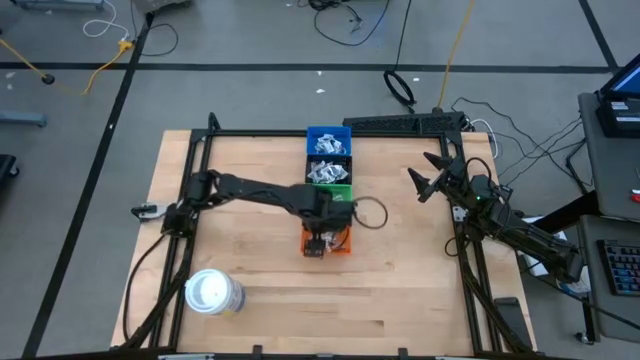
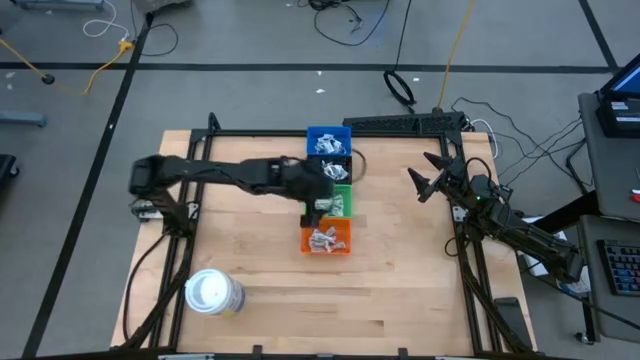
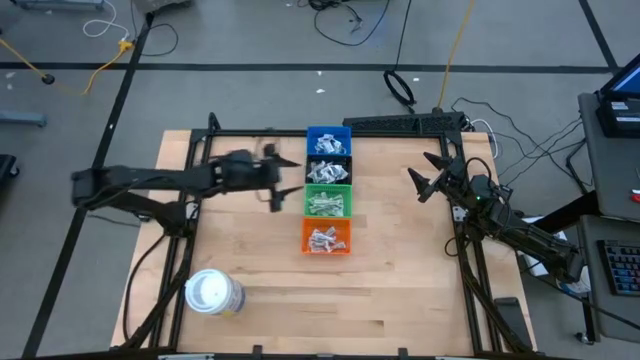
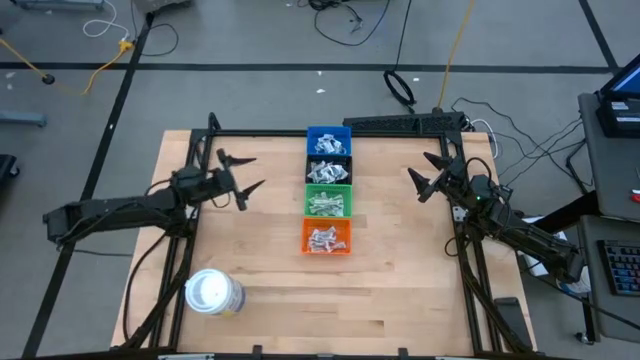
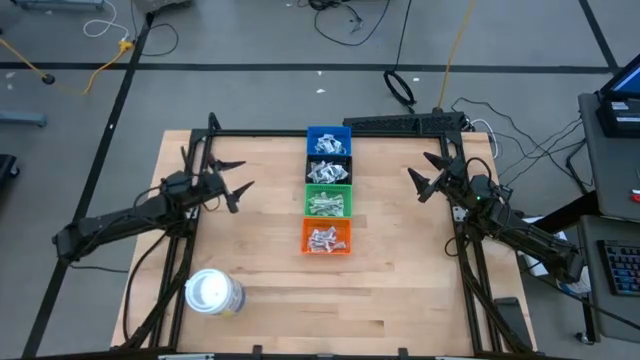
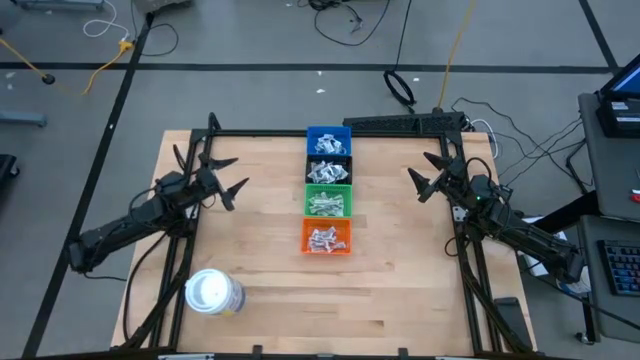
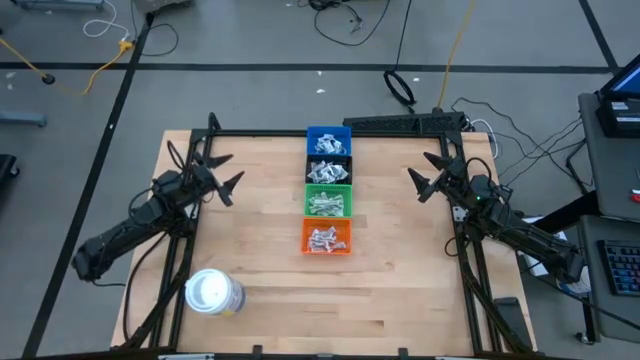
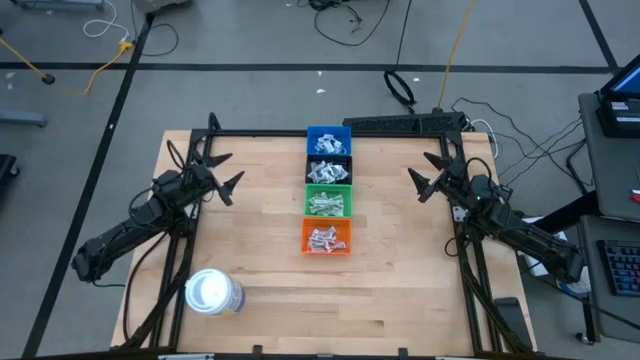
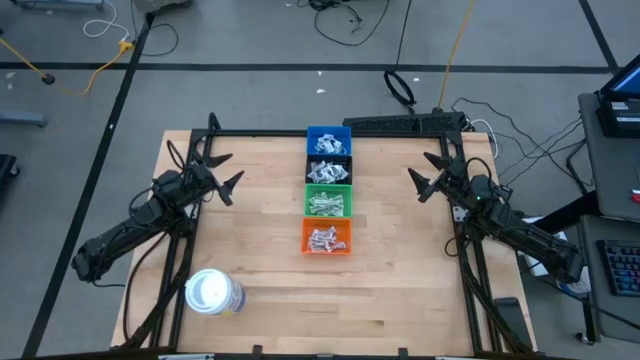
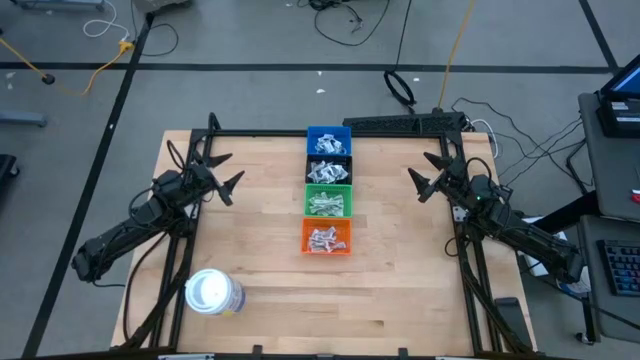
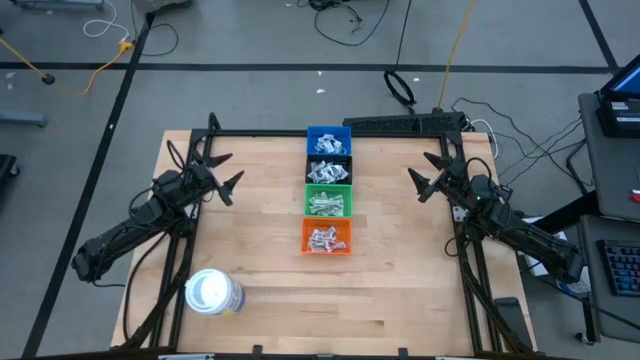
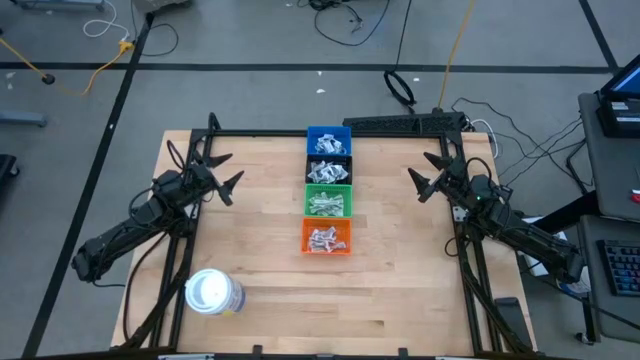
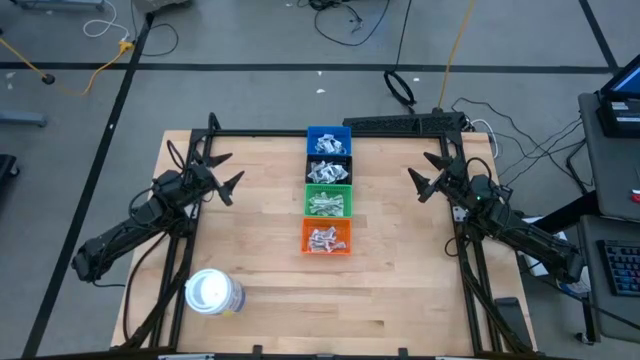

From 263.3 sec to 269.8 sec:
Task: Pick & Place First Aid Supplies
Return to Home Position

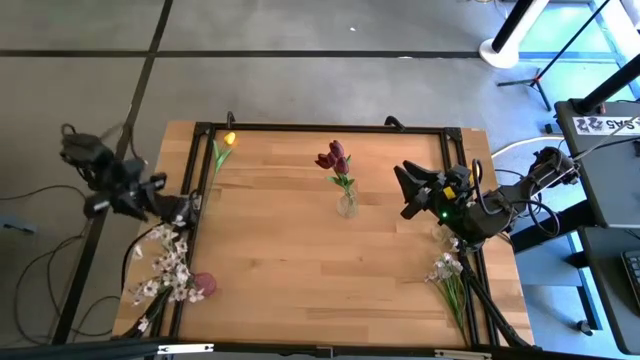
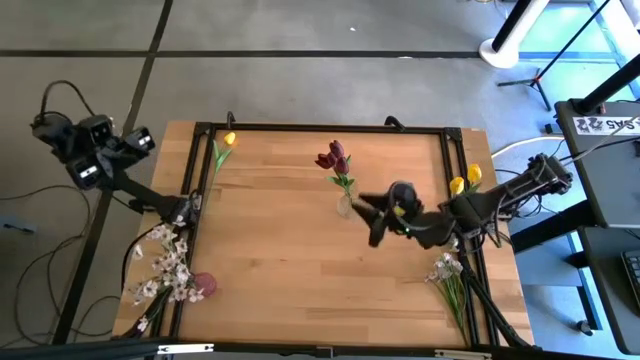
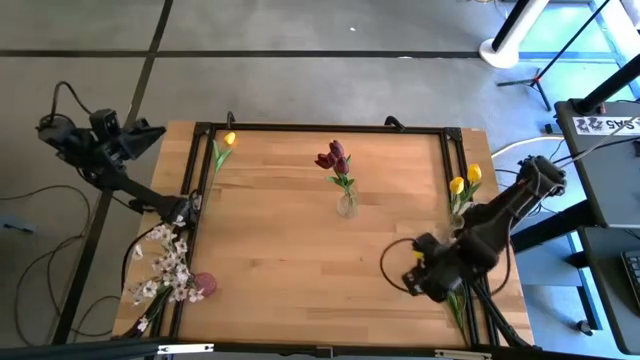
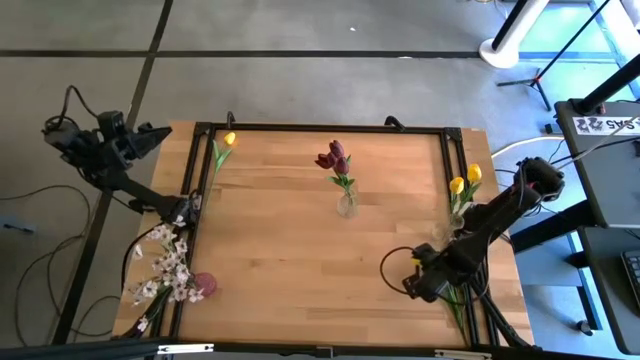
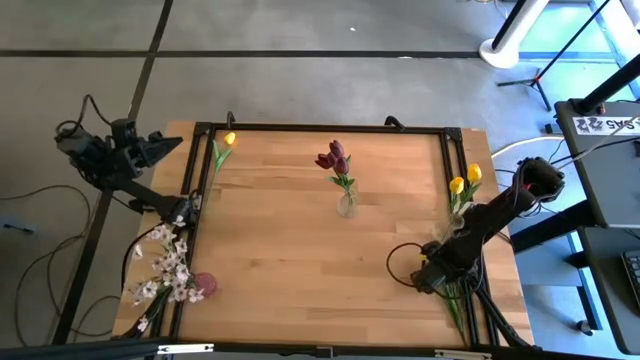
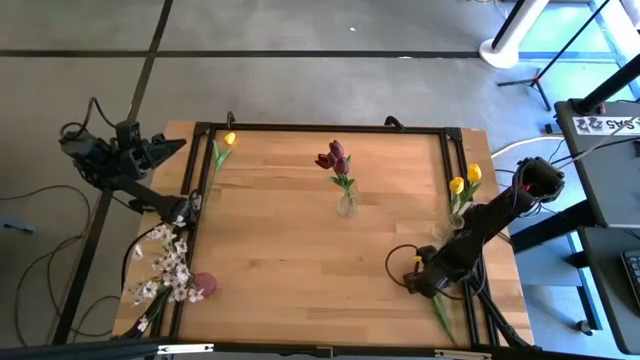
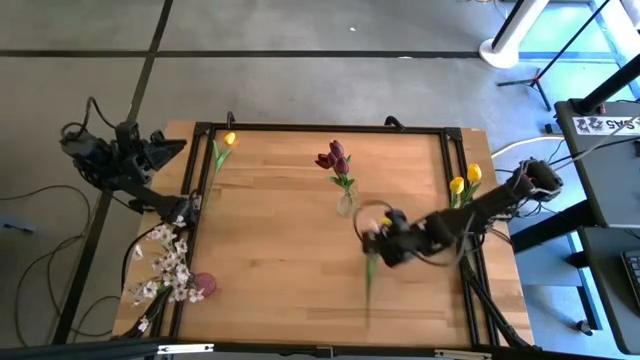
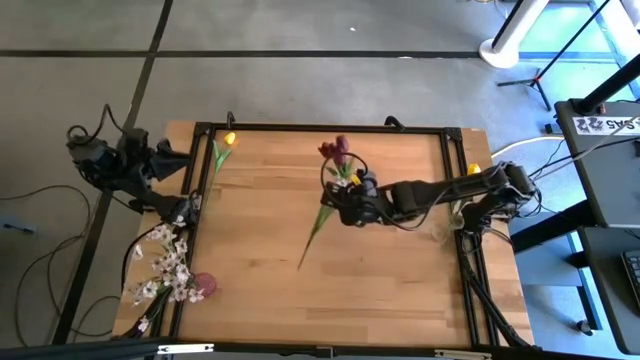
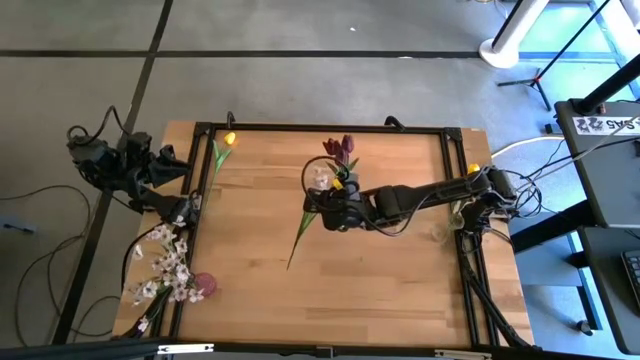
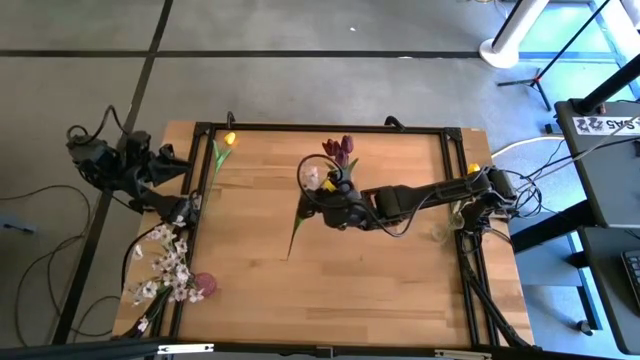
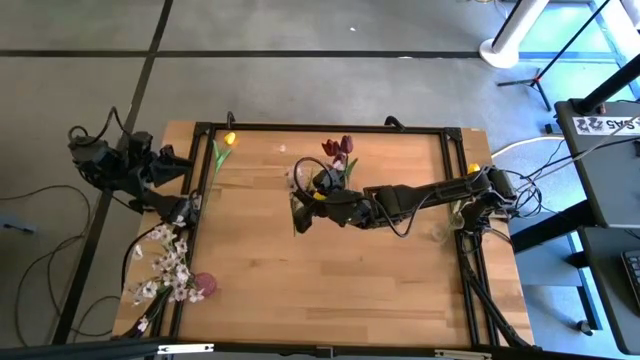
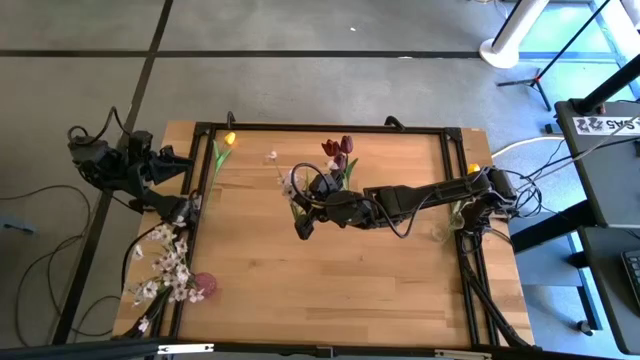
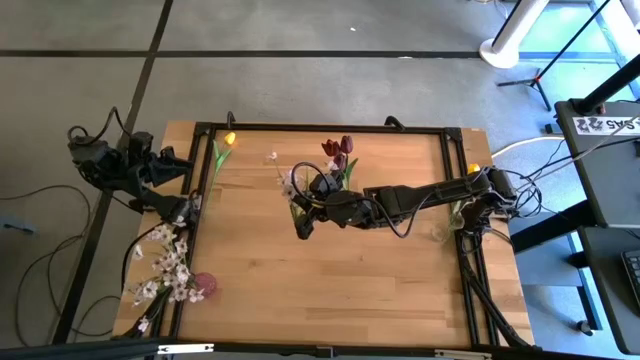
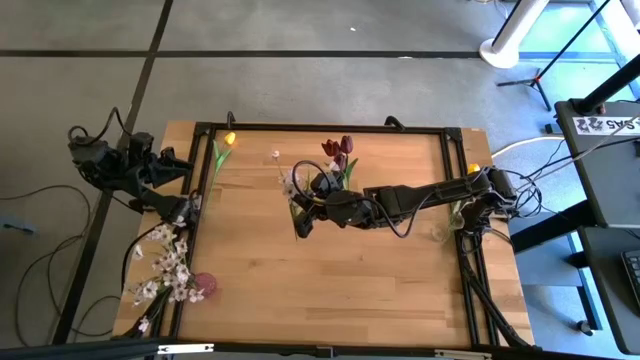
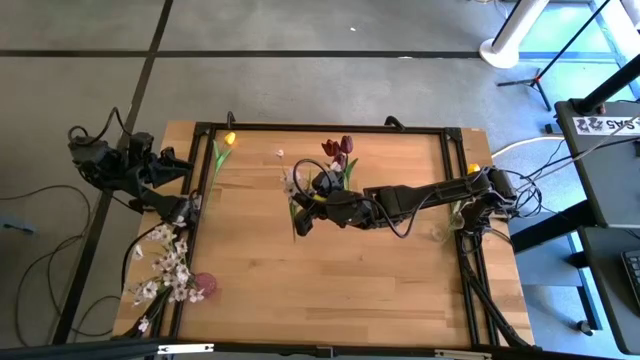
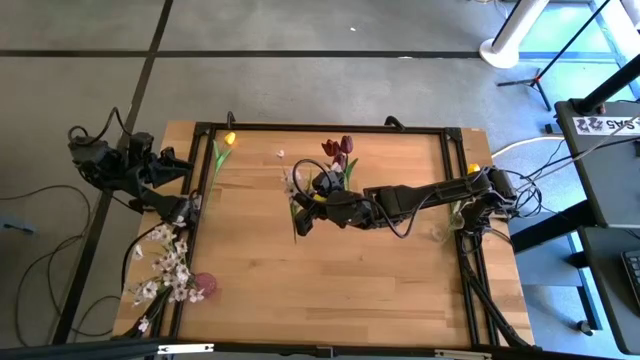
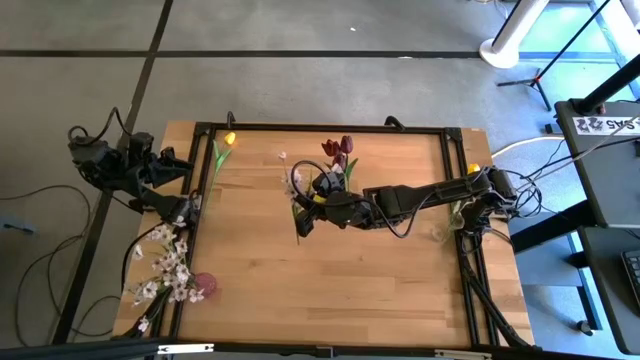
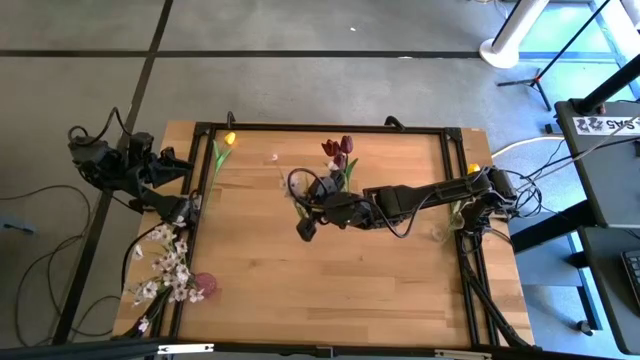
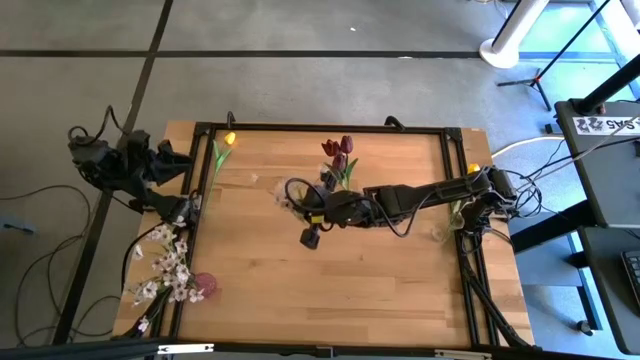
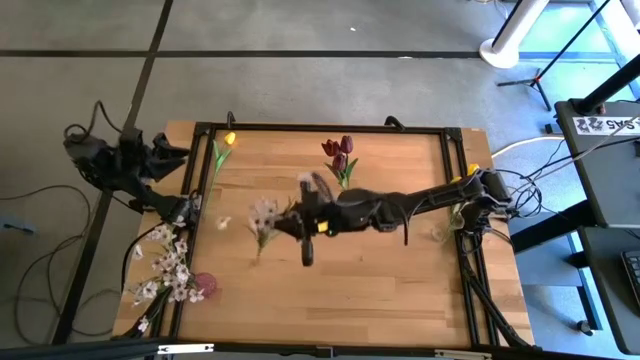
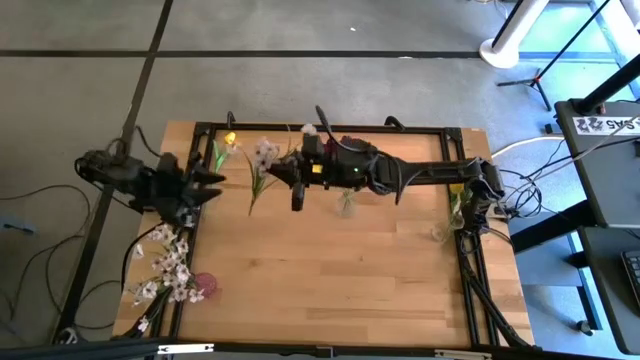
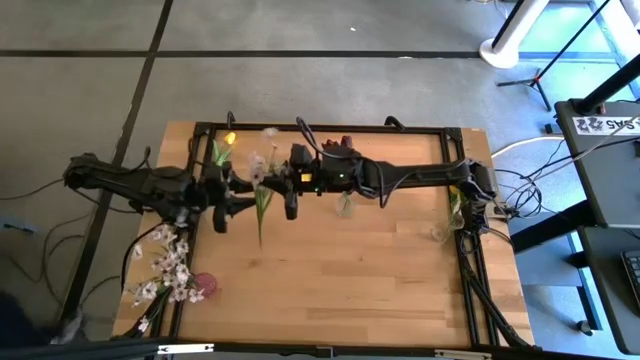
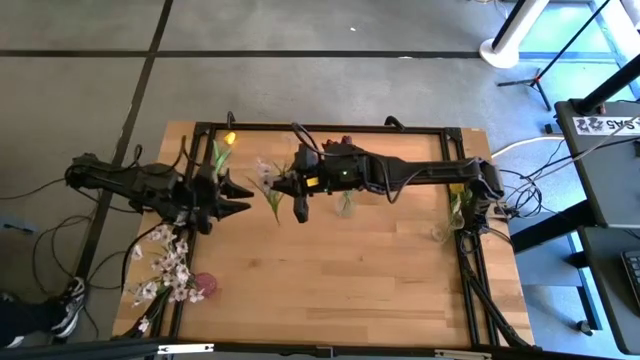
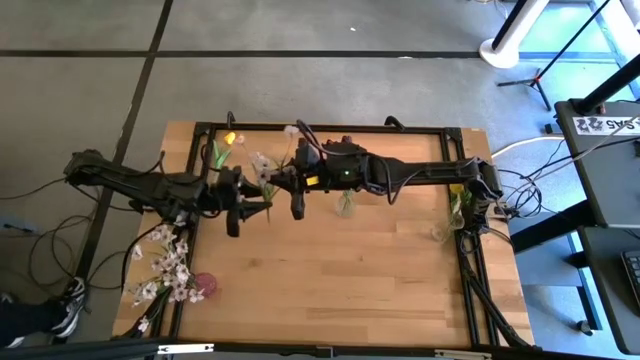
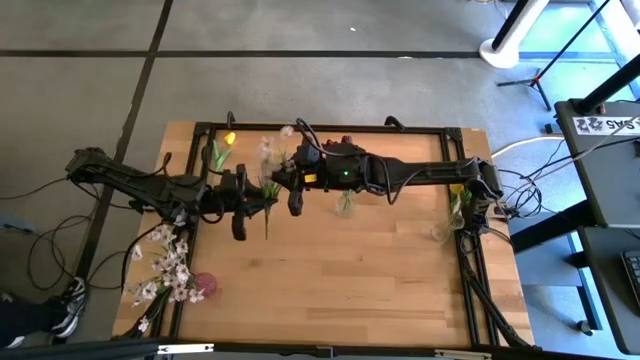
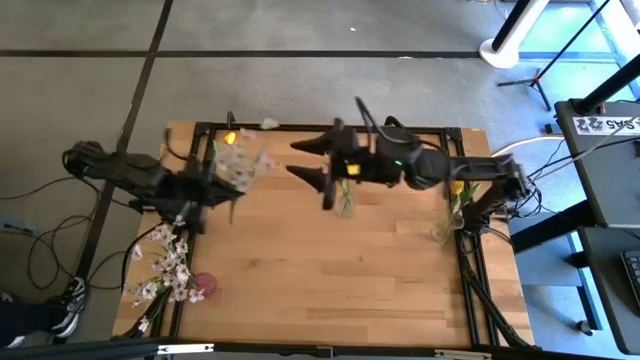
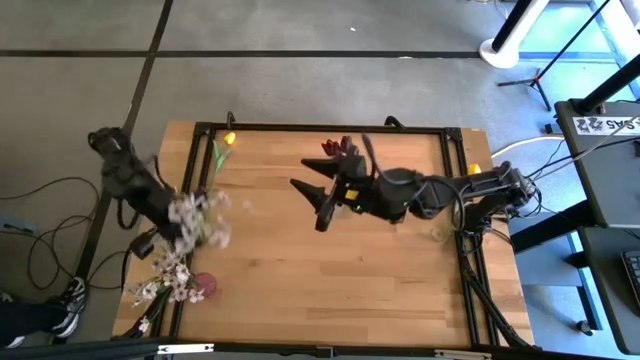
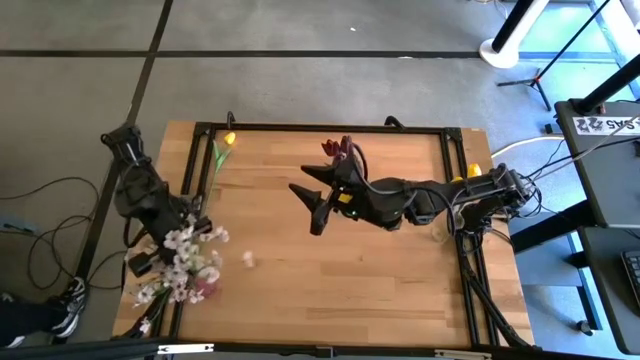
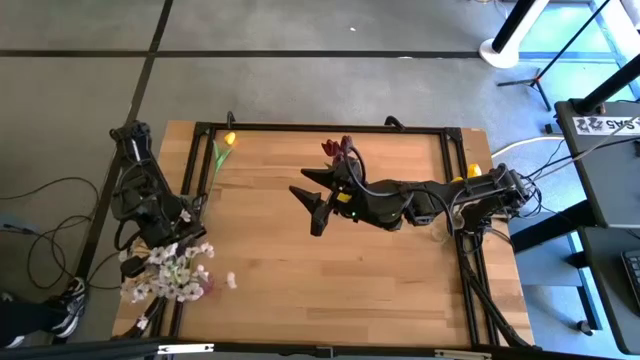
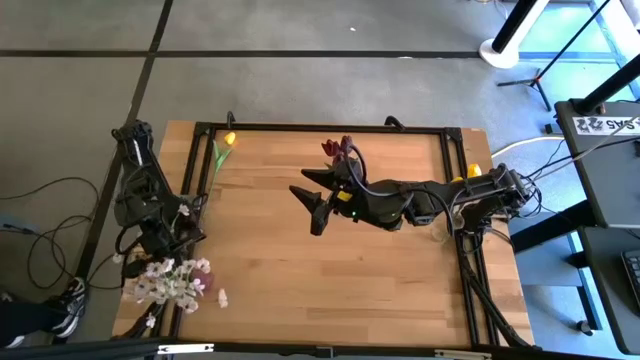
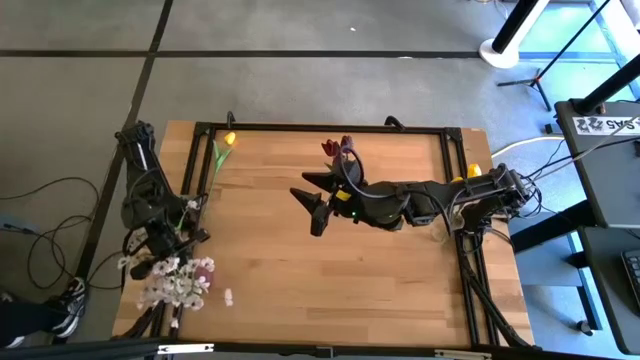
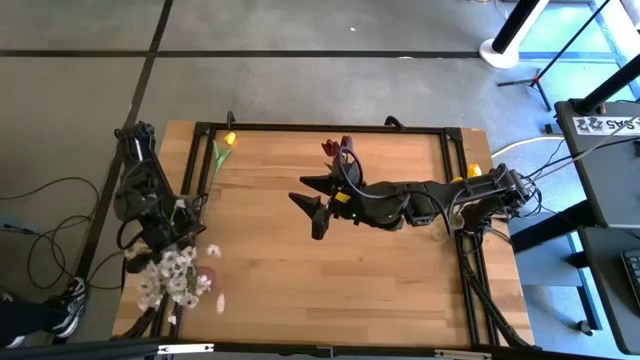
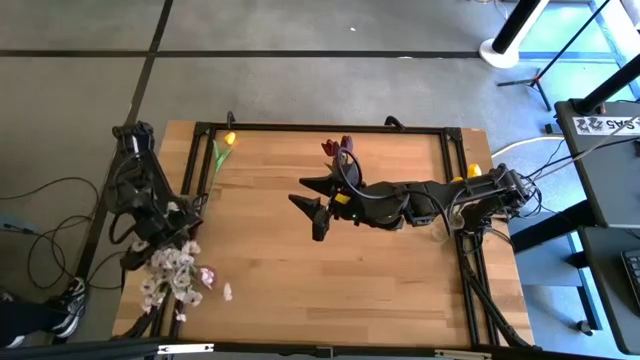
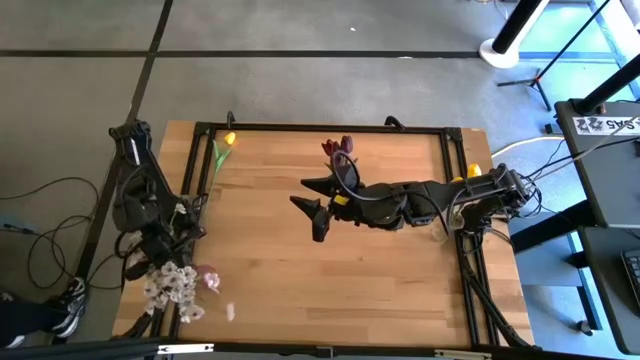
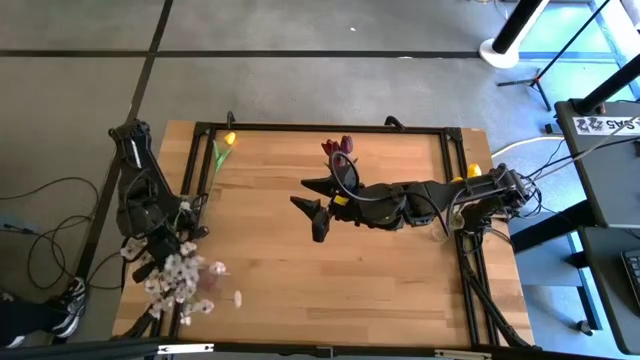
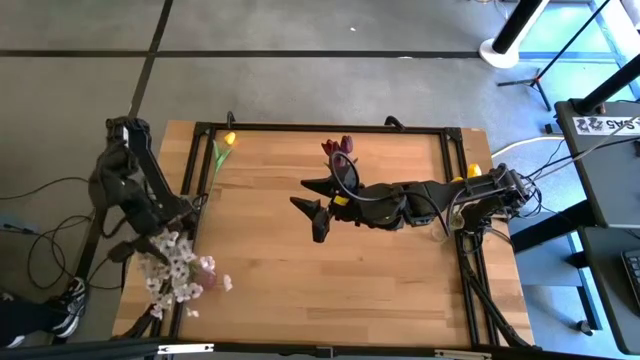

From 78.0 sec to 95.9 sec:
Task: Sort flowers into vase by color
Put the white flowers into the violet vase
